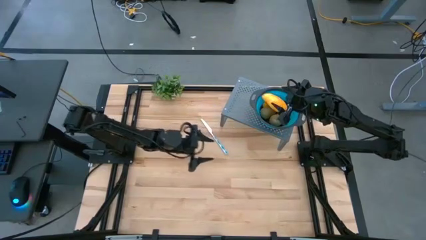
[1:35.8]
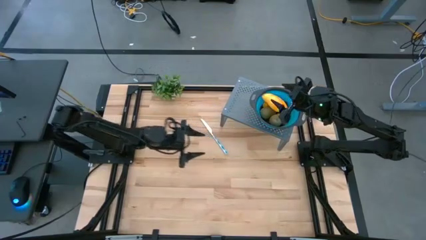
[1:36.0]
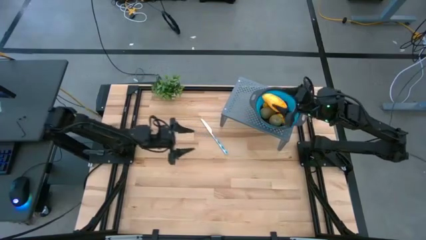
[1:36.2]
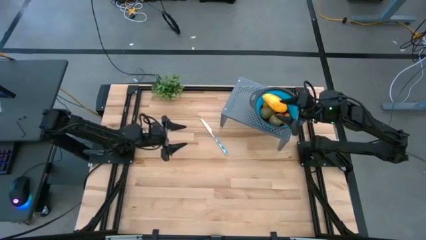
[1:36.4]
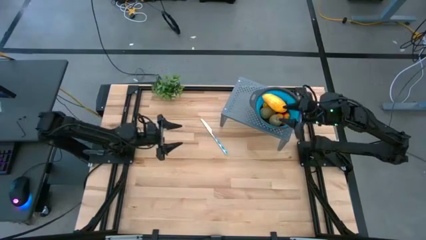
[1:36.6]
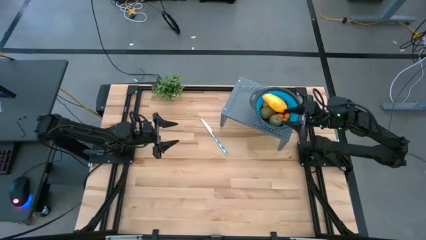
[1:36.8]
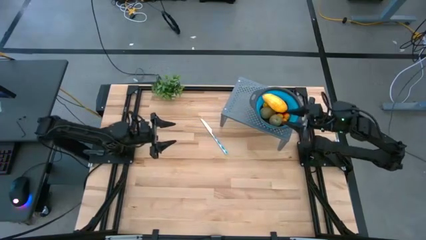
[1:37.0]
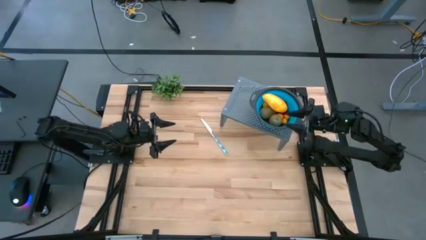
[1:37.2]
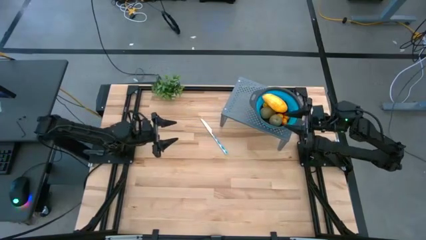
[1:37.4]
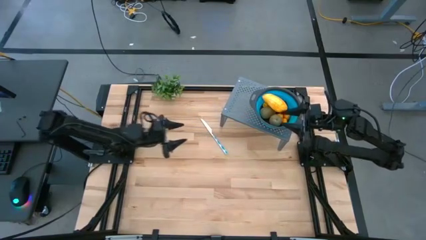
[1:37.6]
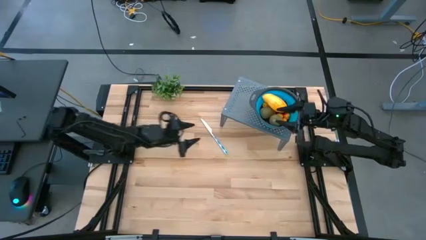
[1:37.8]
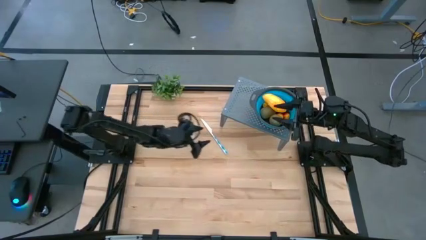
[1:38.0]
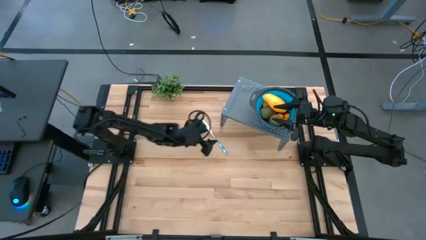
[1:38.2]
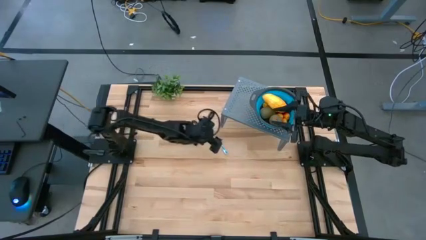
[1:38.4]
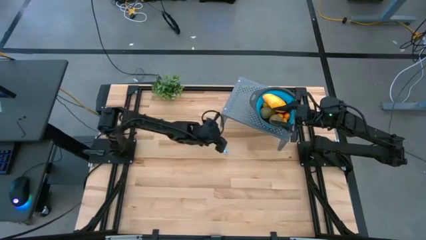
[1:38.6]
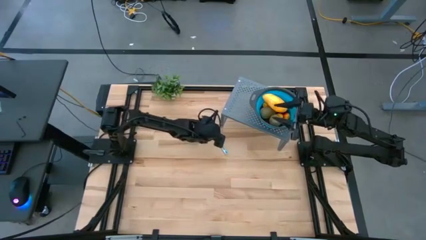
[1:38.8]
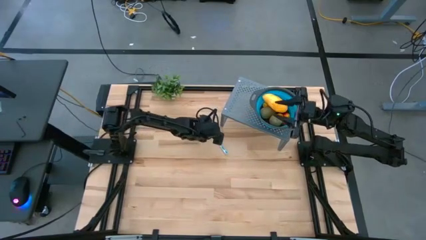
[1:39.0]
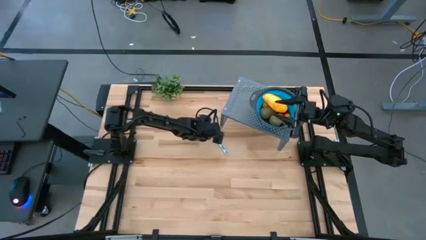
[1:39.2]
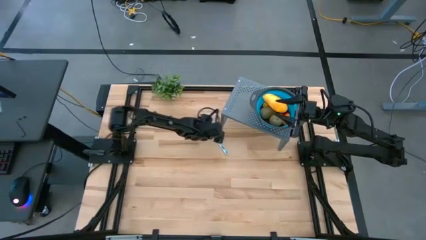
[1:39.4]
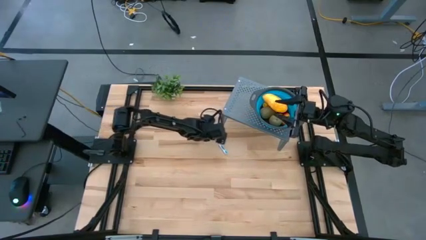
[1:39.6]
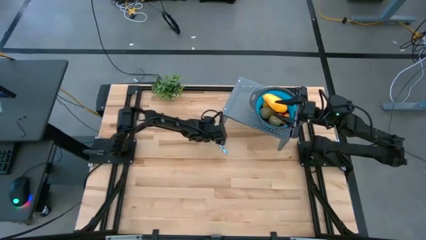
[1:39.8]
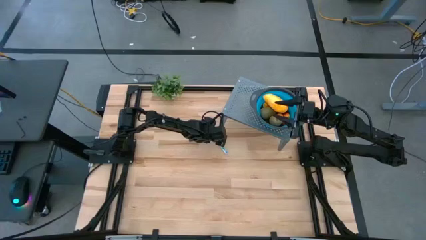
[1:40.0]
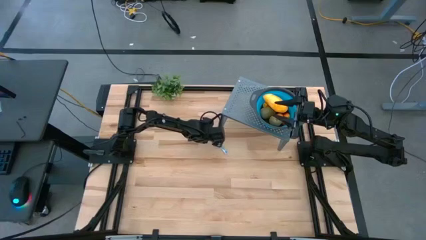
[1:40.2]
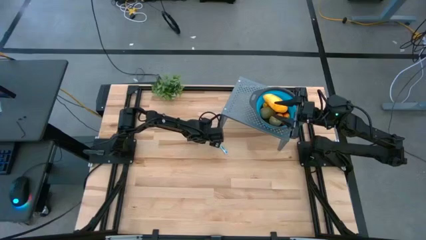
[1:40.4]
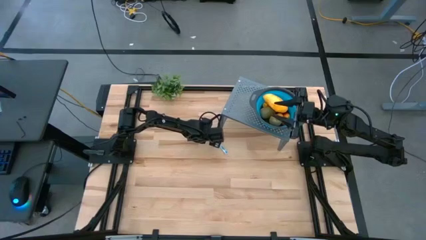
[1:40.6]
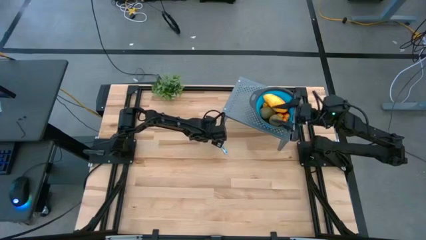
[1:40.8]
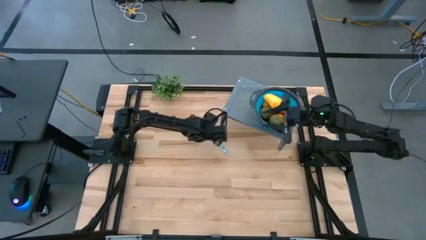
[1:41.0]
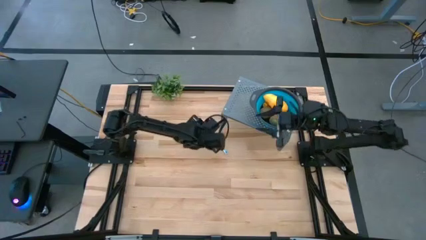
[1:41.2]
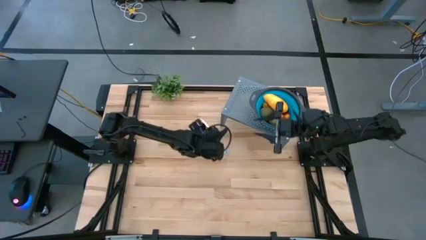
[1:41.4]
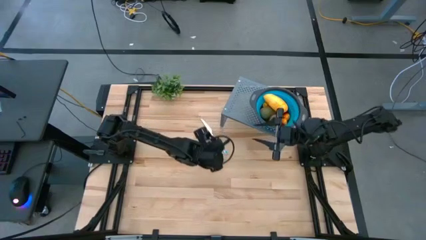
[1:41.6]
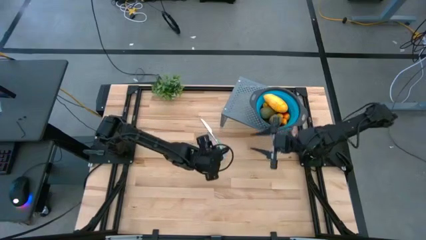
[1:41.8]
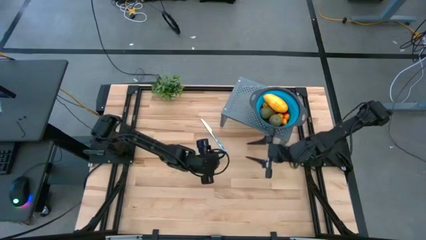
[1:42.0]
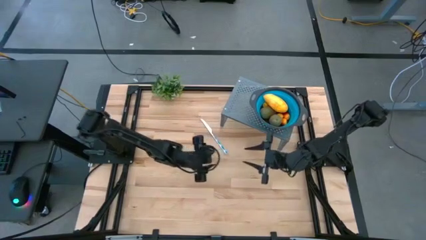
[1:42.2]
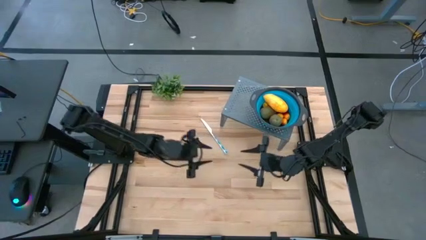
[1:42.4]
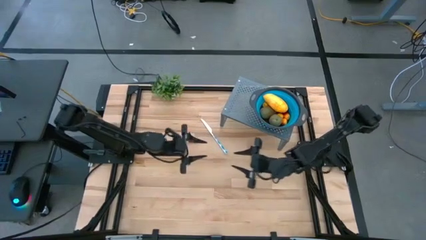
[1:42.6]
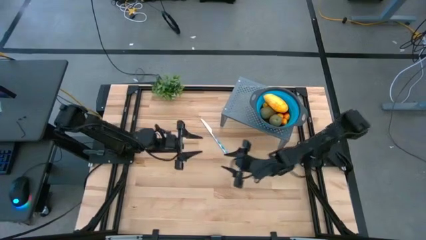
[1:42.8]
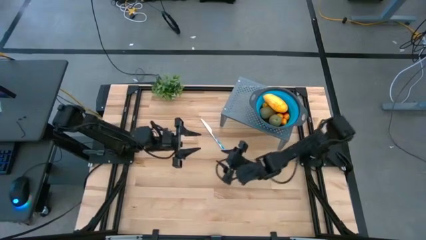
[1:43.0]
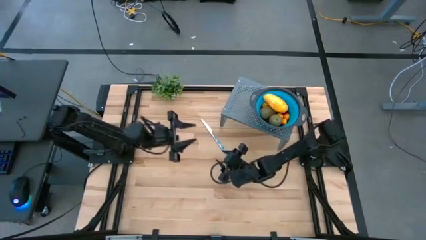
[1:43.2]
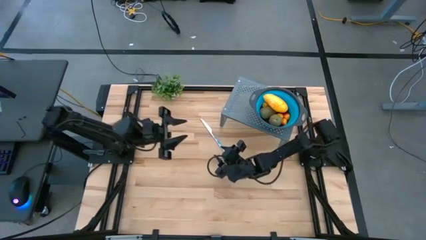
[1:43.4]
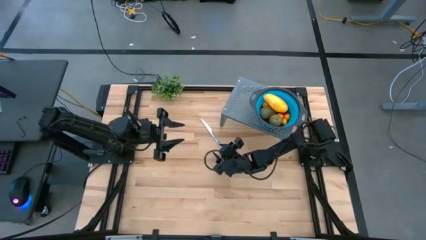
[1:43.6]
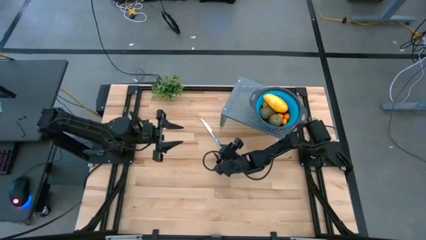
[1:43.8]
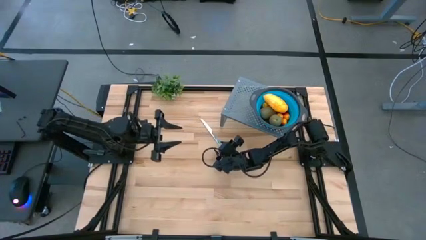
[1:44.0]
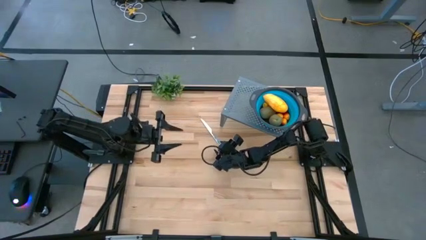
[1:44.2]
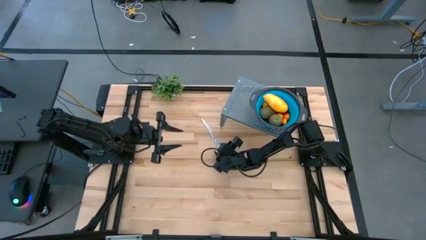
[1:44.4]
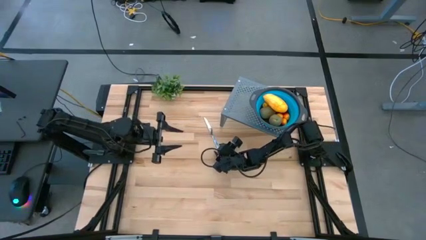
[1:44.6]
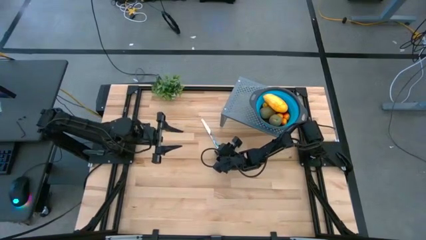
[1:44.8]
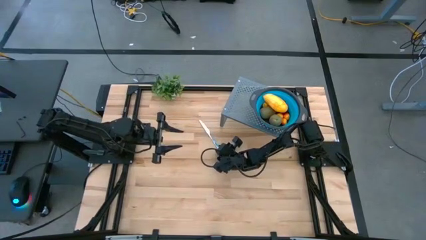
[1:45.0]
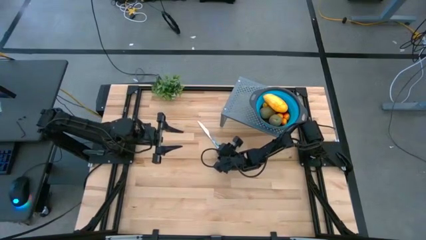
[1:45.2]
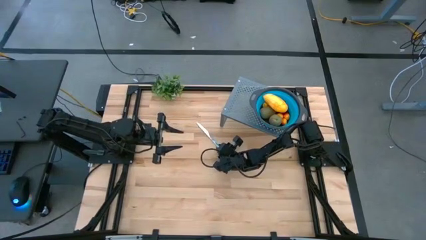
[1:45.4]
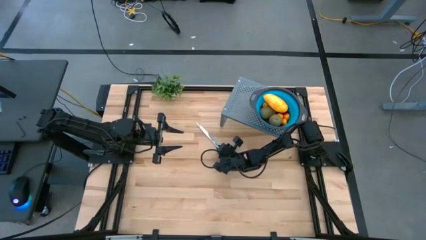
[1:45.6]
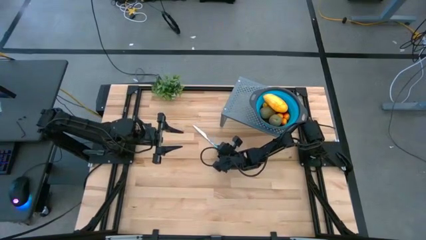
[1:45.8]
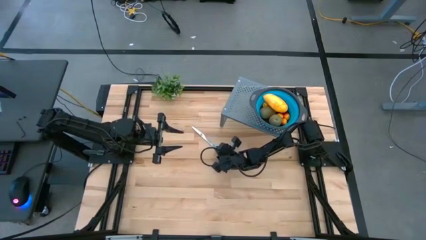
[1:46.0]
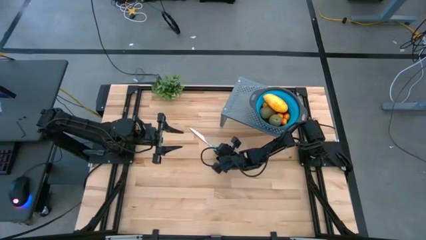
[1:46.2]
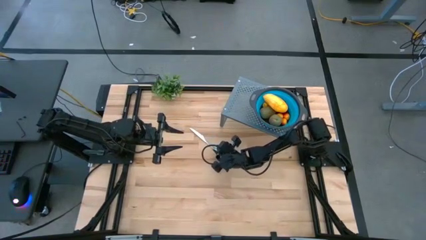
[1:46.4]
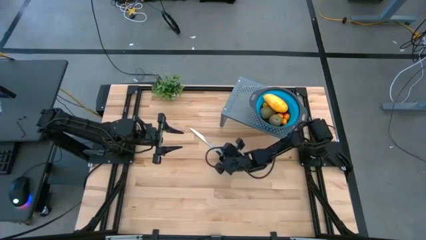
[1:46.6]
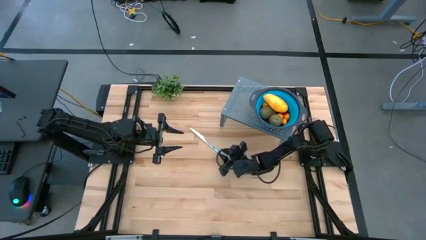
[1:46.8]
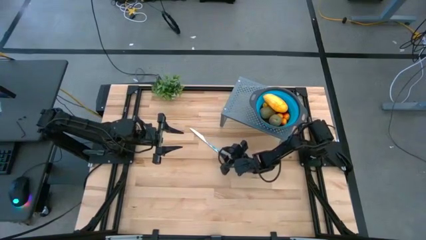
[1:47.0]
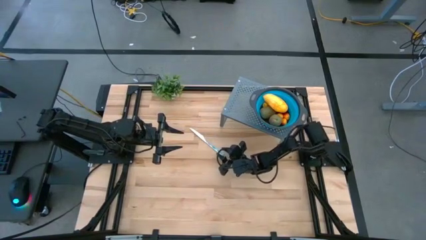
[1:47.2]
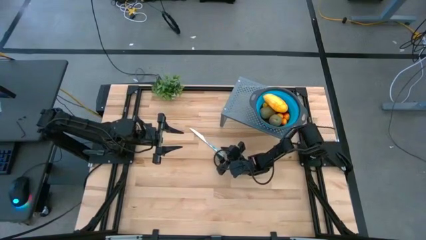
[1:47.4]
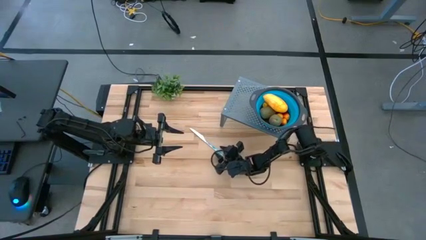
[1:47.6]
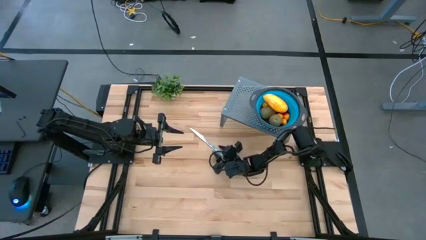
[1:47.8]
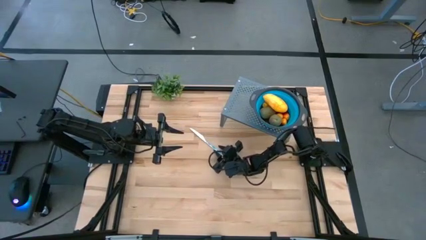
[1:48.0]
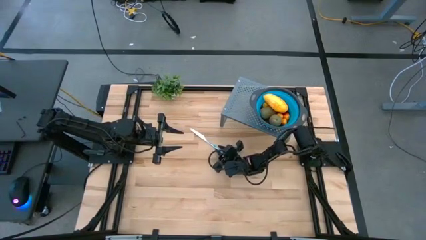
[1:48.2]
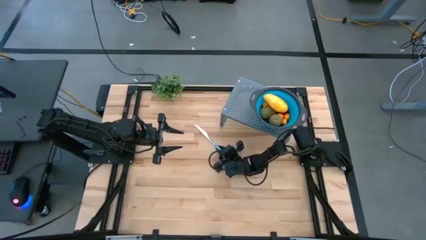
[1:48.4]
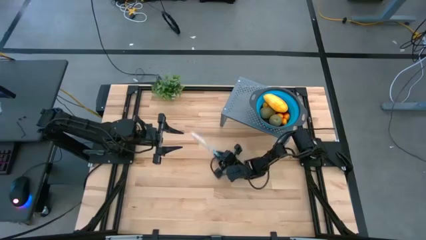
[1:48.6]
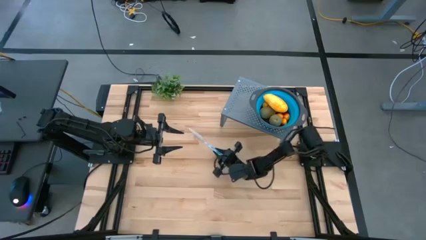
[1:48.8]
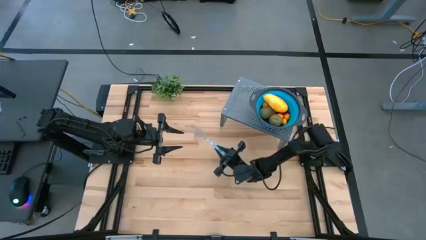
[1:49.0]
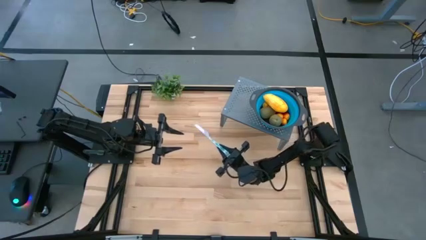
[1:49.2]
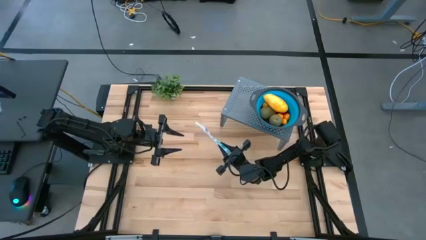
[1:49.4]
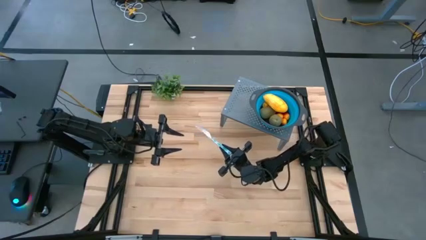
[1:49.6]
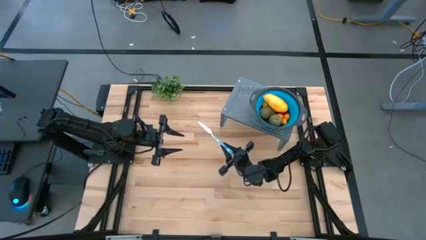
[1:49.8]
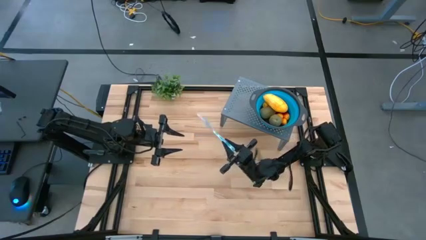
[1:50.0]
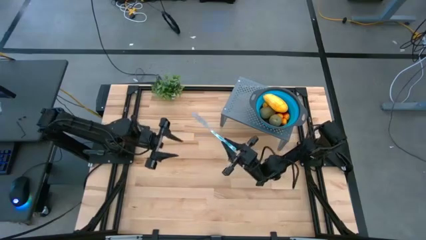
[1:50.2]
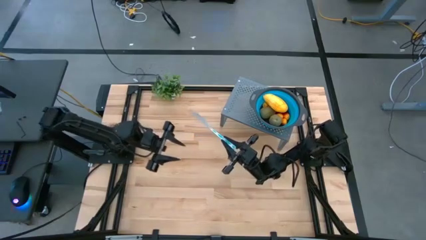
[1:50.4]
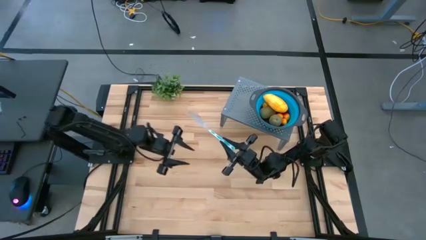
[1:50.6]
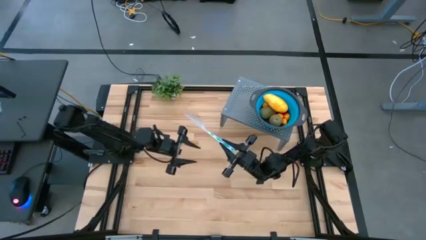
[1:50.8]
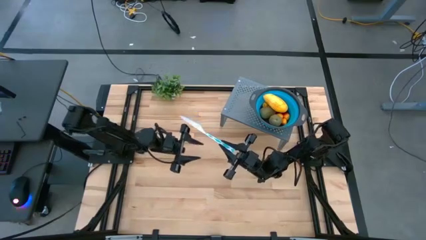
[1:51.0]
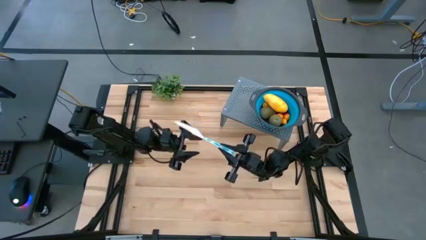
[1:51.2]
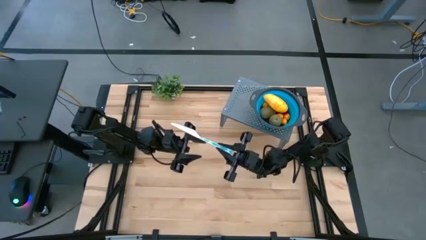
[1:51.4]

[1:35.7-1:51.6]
Task: Pick & Place Fruit
Put the green patterned knife on the shelf

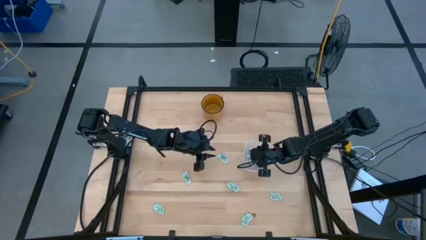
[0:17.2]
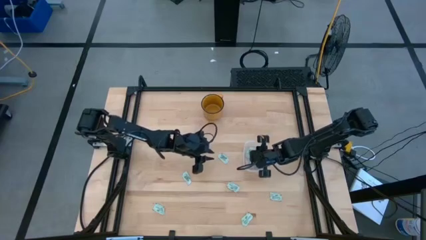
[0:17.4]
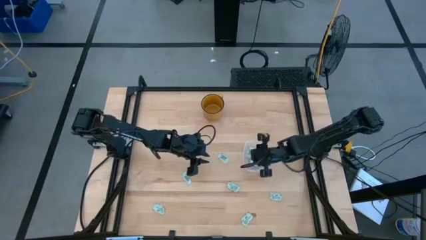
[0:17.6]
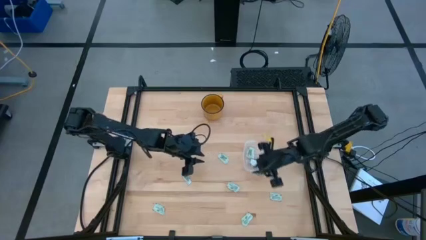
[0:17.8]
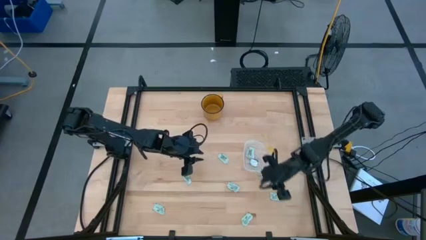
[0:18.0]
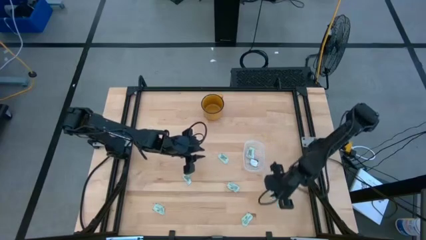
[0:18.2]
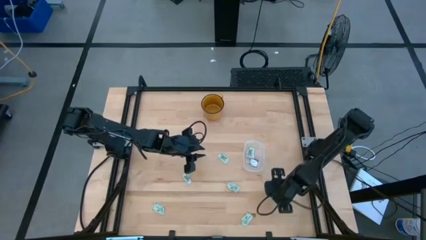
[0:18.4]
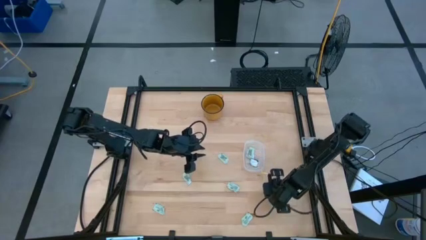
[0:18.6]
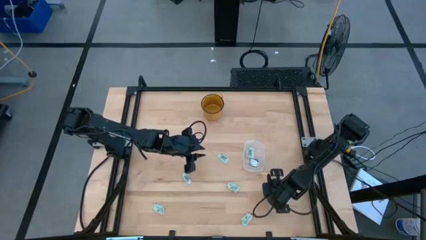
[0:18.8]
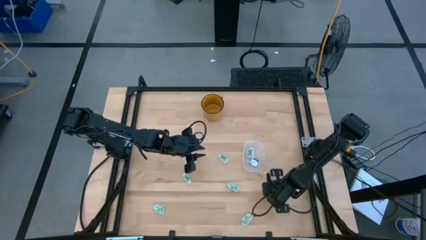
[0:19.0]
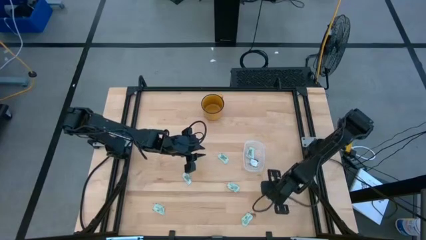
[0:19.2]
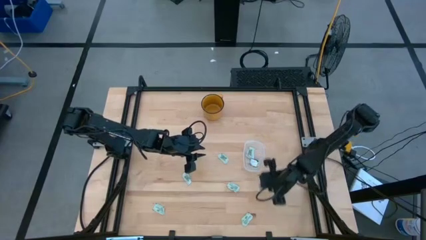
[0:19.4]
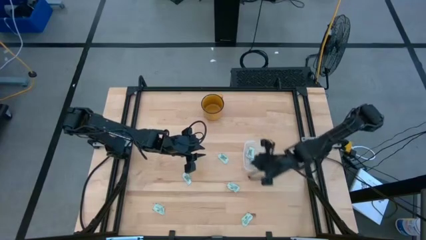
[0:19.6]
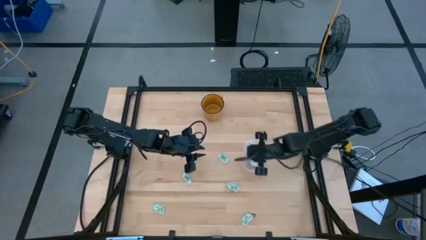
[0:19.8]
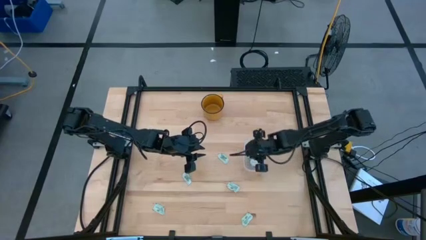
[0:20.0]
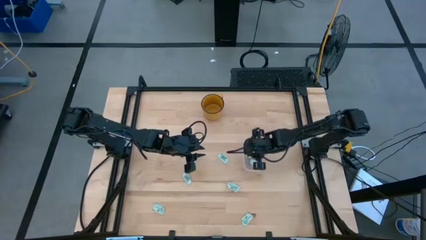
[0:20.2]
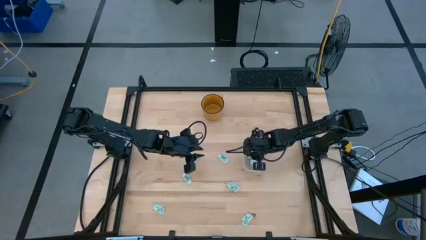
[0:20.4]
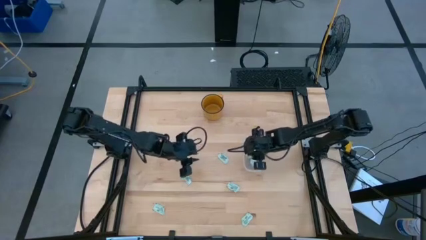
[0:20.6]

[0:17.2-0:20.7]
Task: Pick and place Stevia / Truvia into bins
Put the white stevia packet into the transparent bin
